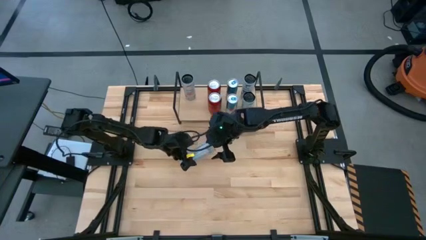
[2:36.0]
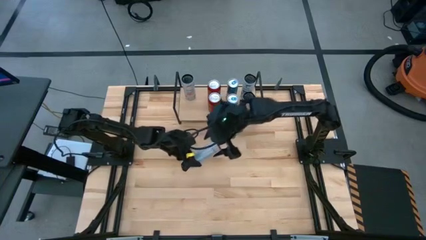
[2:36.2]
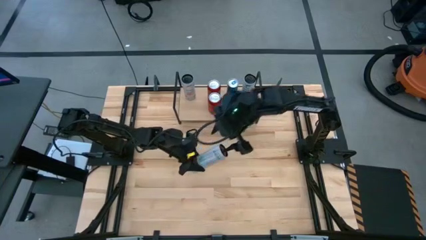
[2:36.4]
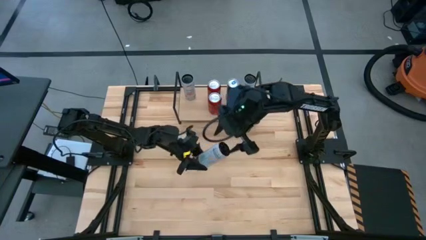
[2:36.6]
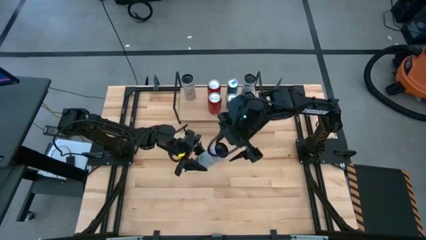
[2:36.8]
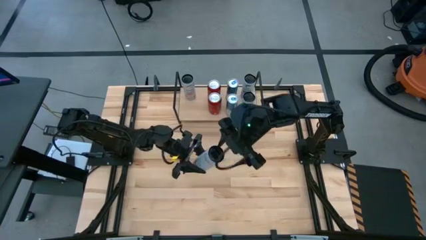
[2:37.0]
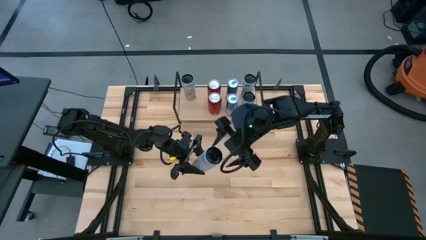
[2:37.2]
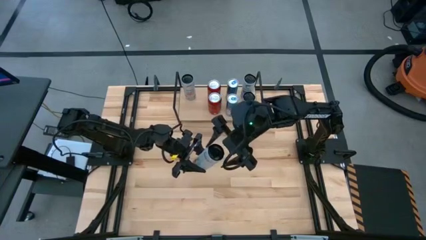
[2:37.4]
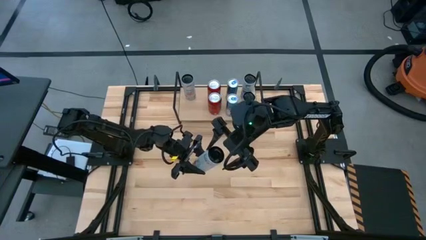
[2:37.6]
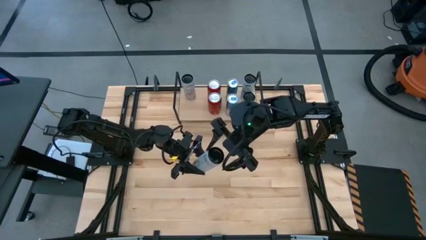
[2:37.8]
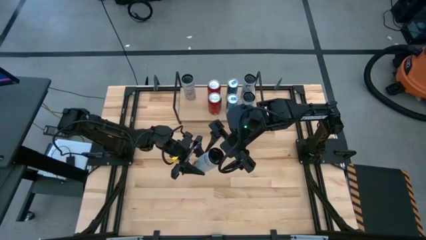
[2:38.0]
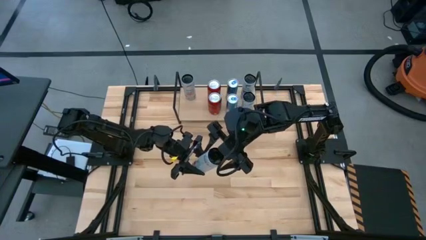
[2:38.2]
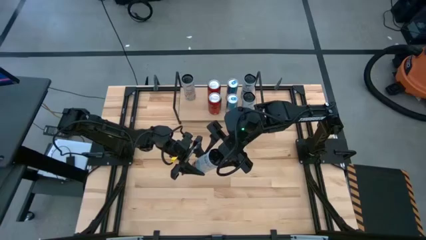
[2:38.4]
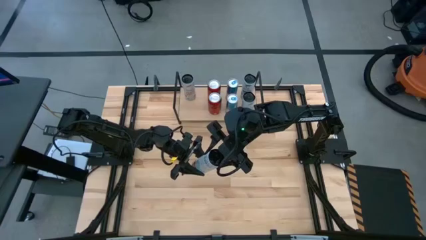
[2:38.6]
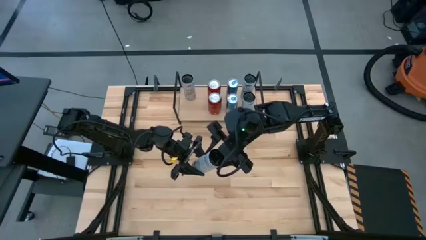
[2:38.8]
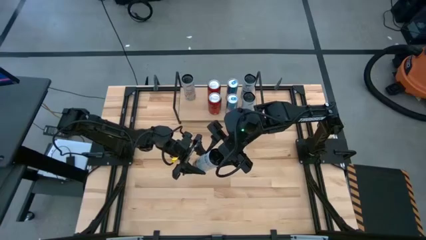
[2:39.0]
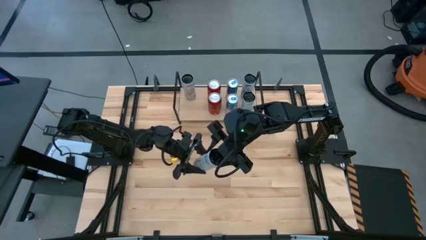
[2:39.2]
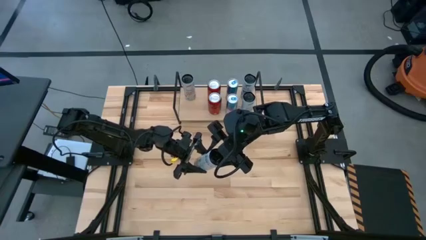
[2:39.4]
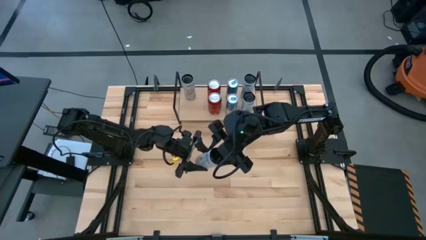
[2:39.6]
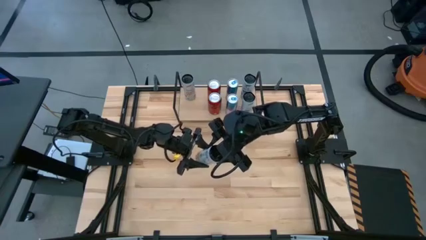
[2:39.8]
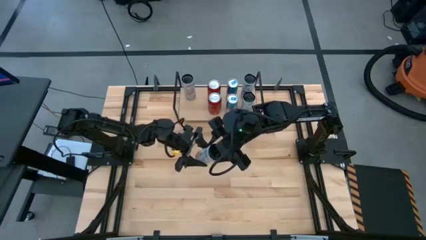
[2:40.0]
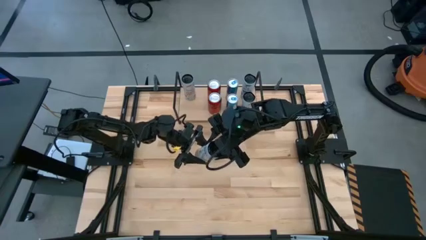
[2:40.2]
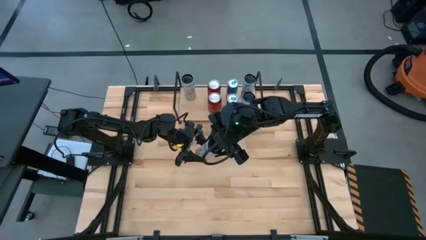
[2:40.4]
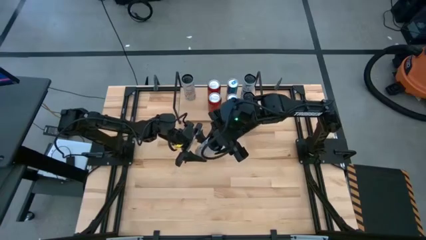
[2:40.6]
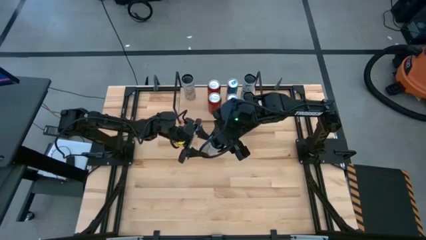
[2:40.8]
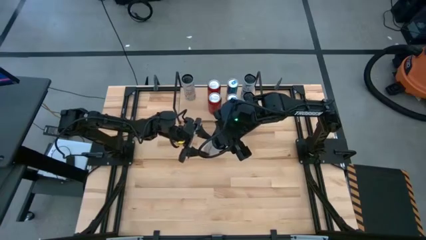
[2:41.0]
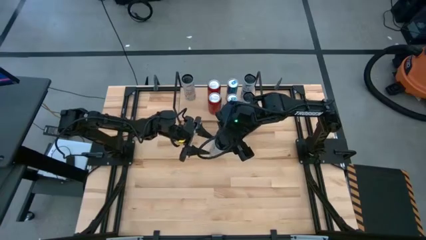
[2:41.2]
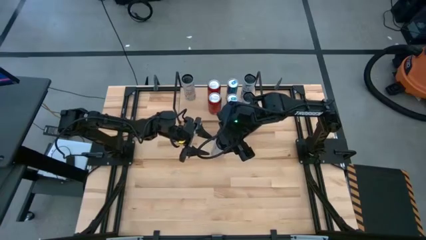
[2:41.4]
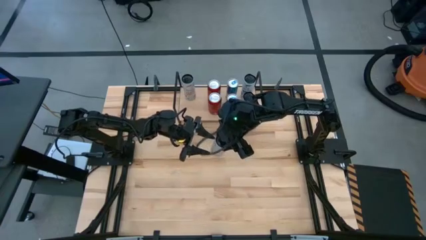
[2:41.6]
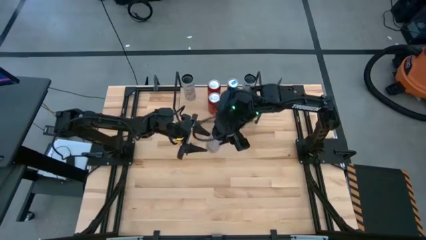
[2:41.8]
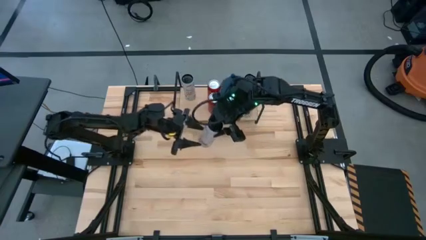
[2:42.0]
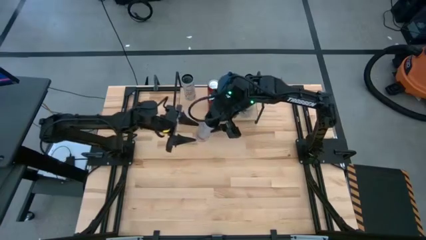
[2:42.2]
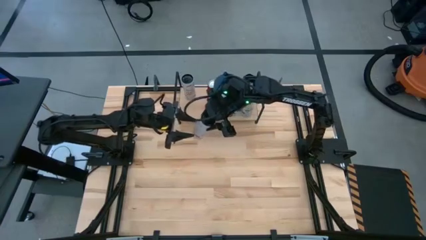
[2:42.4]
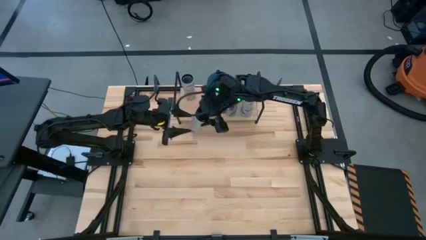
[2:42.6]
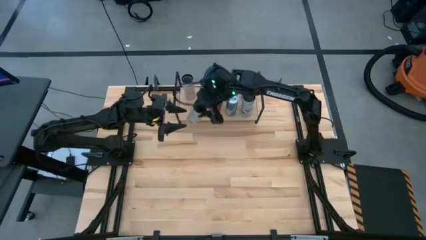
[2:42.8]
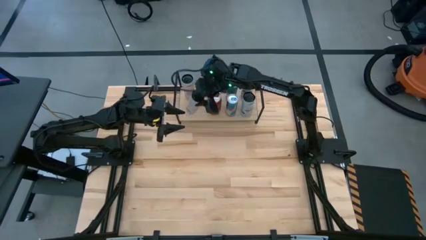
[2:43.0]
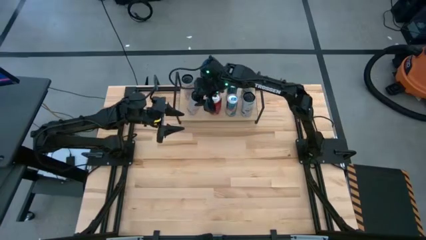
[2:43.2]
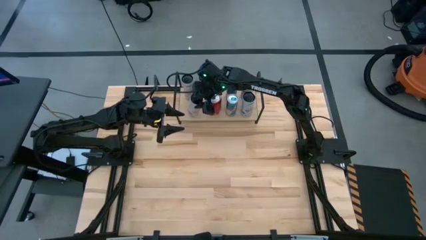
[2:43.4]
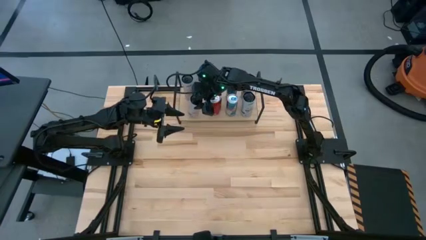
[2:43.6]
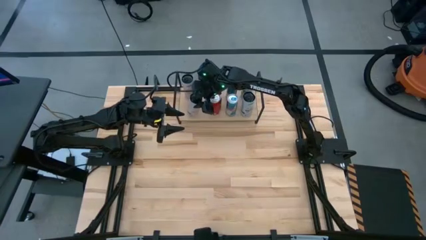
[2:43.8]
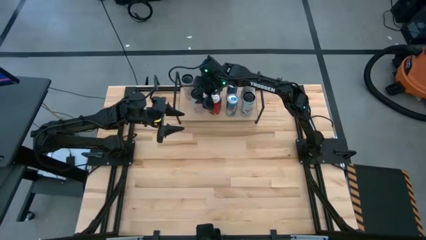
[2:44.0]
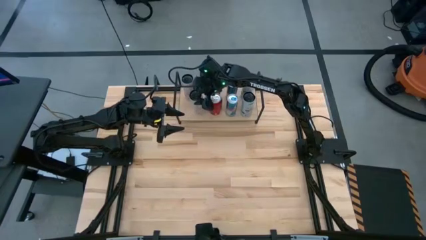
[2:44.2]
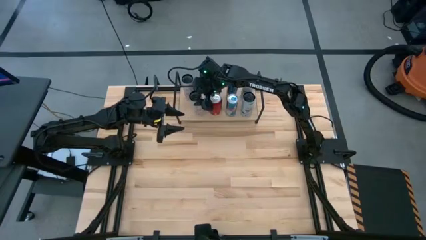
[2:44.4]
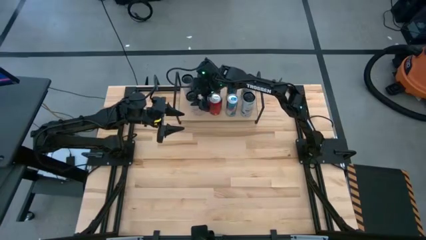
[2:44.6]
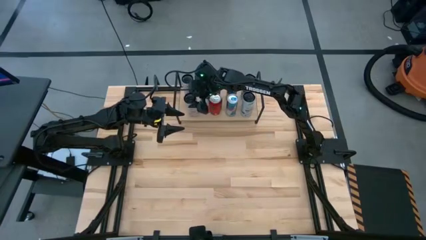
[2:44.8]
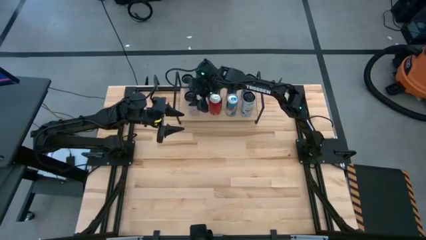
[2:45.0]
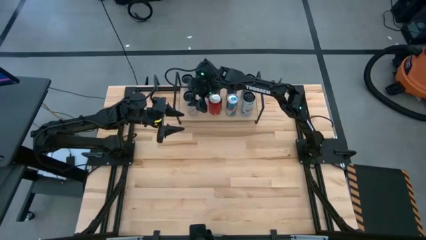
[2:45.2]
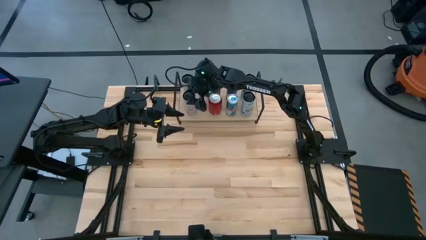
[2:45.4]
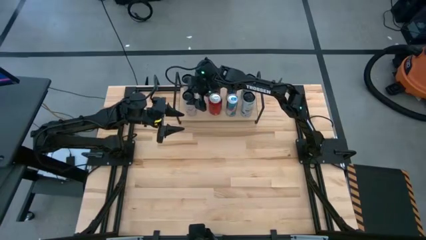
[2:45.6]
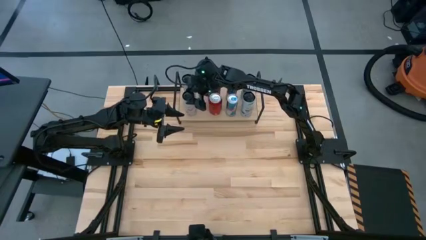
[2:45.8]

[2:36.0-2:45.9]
Task: Place canned beverage on shelf
Put the white pink soda can on the shelf aligned with the other white pink soda can

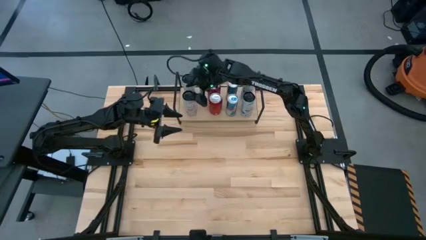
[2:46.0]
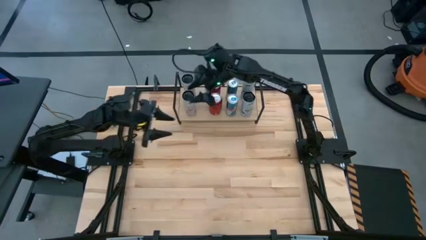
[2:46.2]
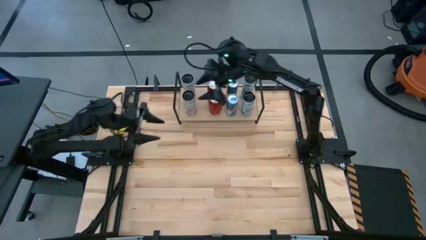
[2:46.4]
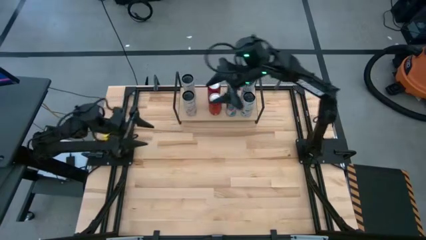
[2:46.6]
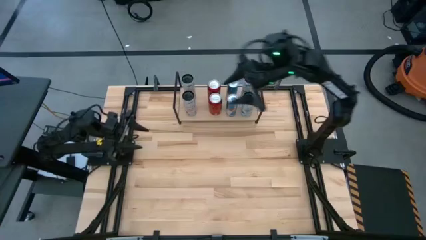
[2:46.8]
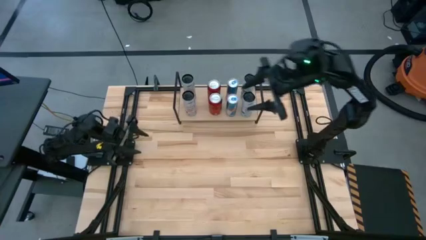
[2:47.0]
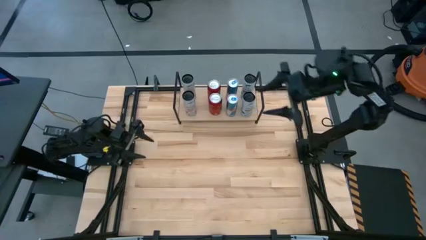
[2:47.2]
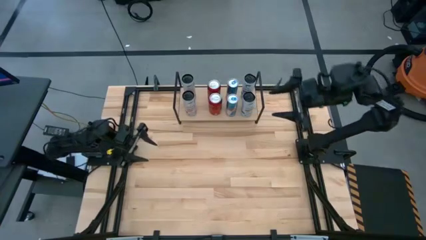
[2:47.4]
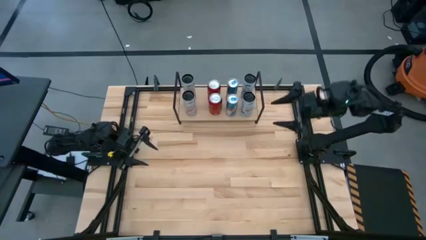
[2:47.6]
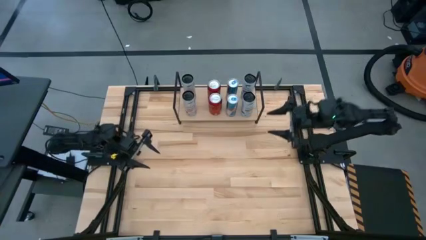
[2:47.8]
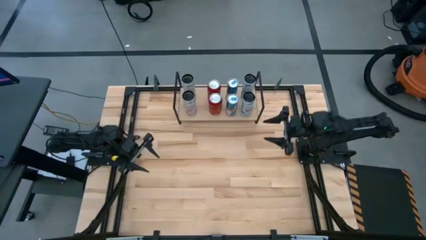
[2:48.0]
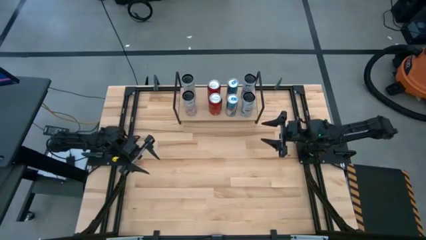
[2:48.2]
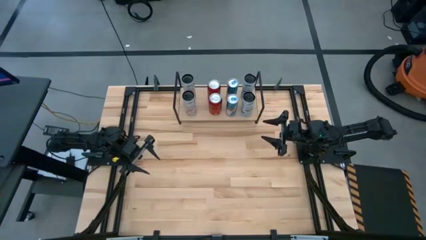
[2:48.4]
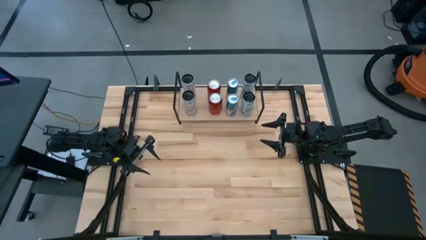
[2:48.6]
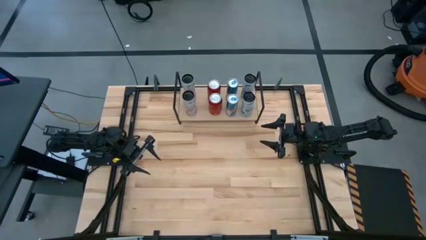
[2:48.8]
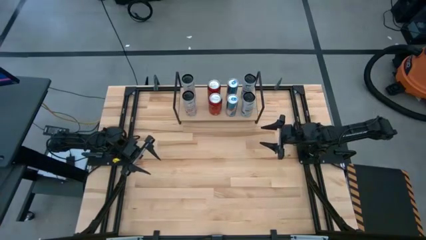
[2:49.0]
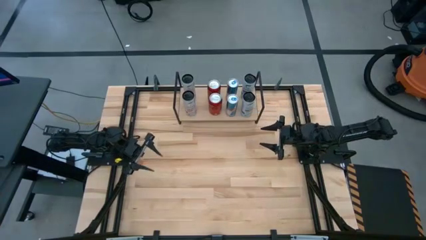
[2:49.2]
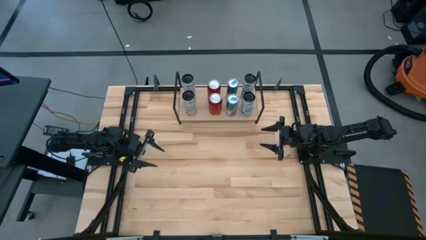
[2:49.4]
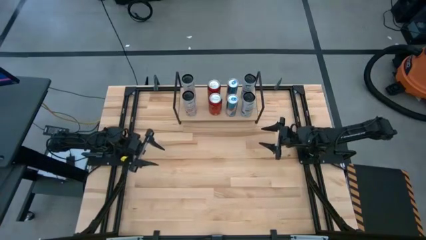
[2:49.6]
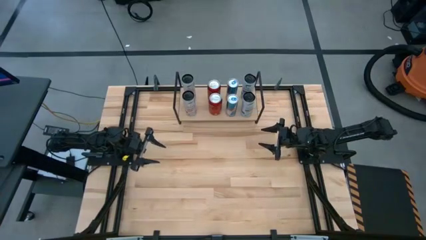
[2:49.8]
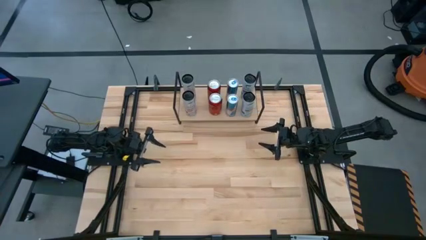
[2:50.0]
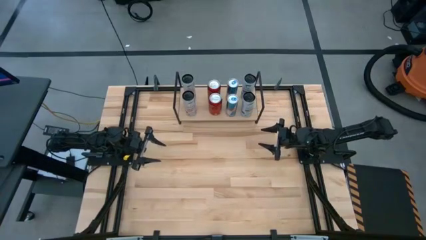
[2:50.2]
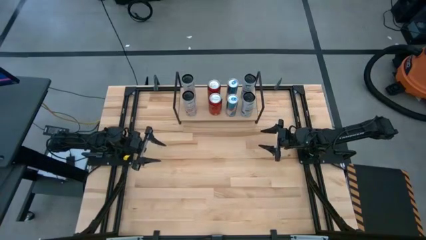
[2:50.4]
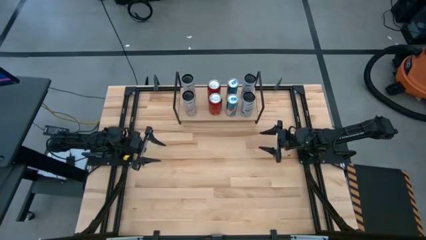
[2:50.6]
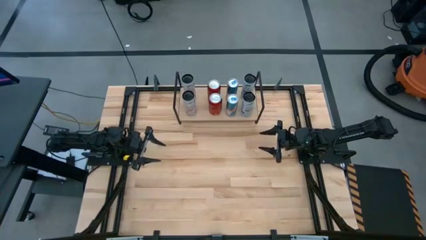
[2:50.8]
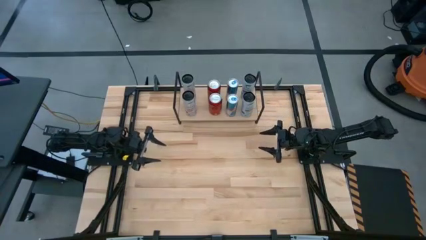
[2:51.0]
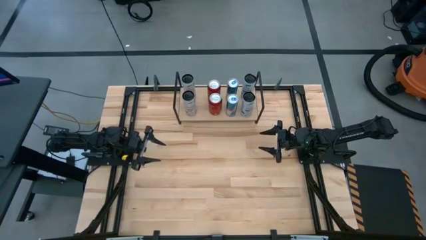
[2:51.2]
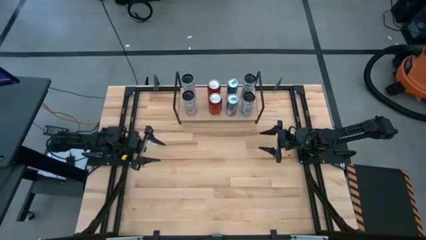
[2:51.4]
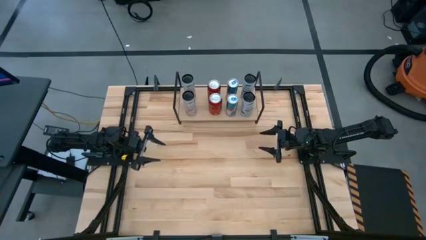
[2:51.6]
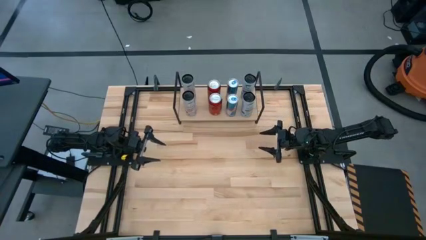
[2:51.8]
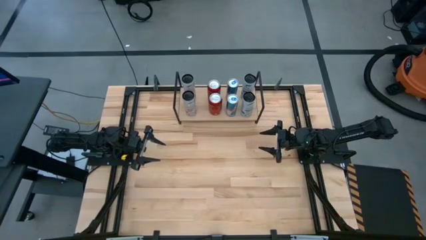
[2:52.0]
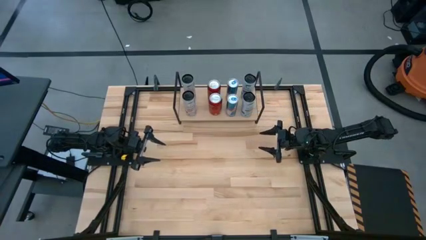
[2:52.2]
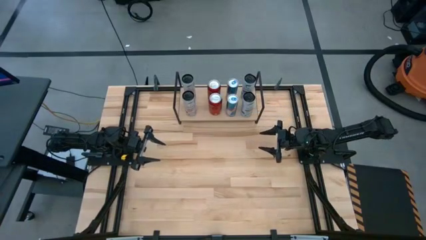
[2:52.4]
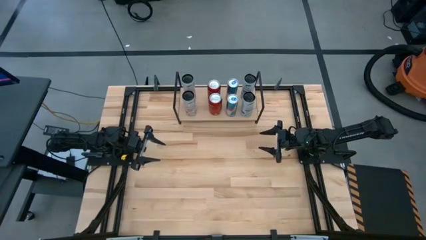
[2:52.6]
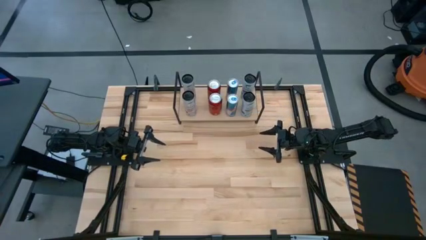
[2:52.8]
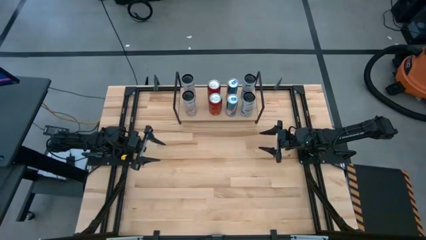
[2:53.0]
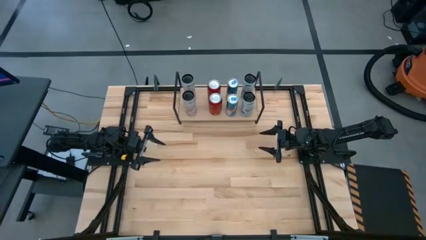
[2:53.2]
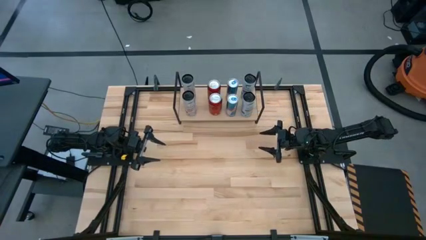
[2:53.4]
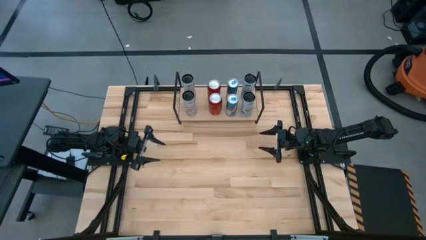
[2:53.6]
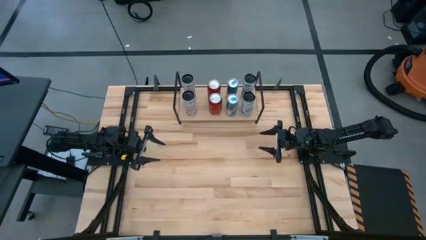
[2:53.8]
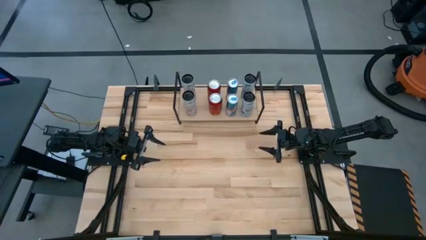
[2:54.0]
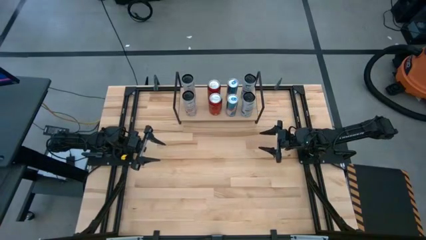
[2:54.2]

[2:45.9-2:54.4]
Return to Home Position
